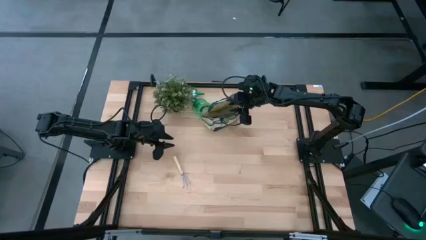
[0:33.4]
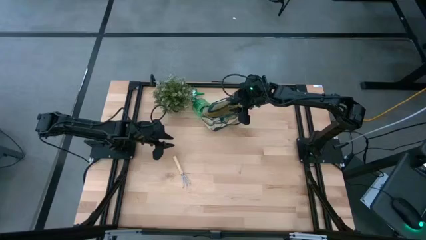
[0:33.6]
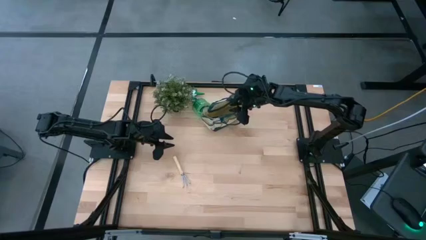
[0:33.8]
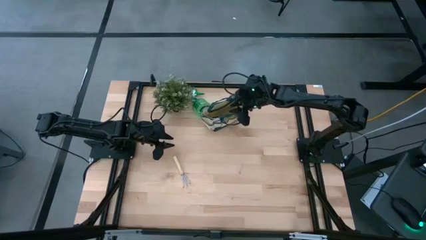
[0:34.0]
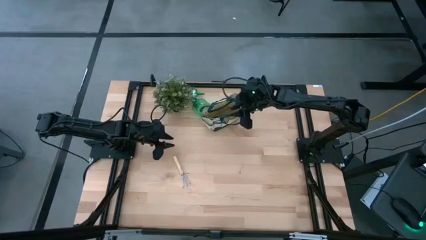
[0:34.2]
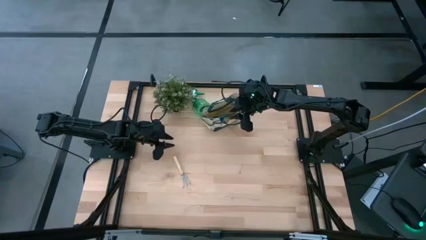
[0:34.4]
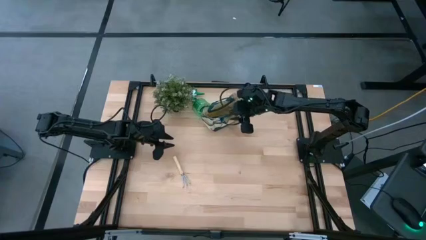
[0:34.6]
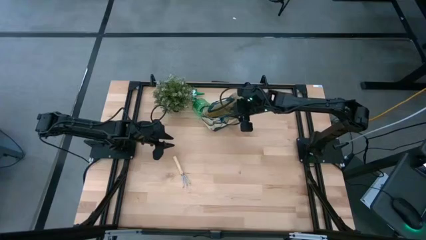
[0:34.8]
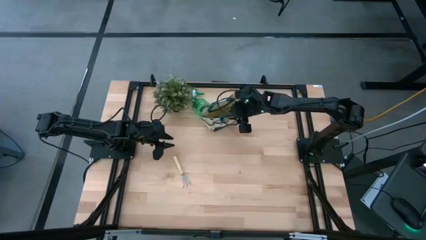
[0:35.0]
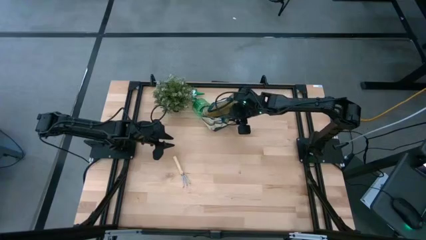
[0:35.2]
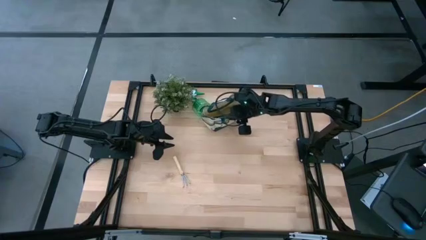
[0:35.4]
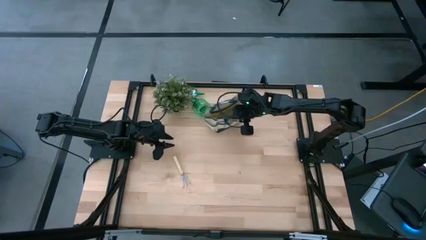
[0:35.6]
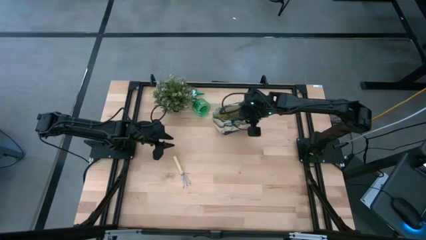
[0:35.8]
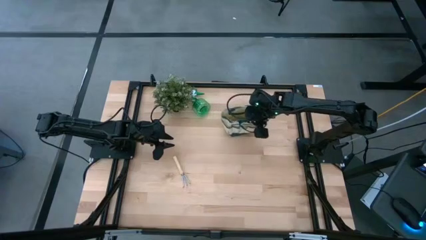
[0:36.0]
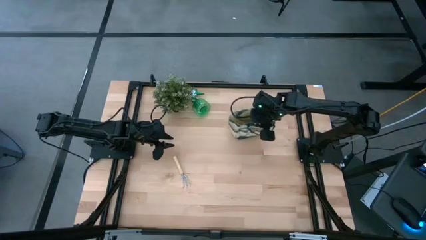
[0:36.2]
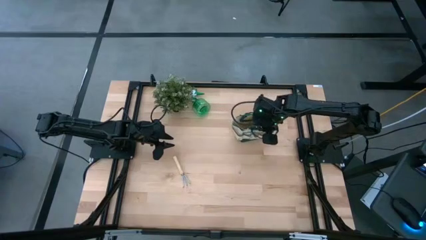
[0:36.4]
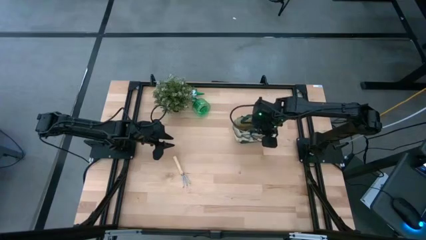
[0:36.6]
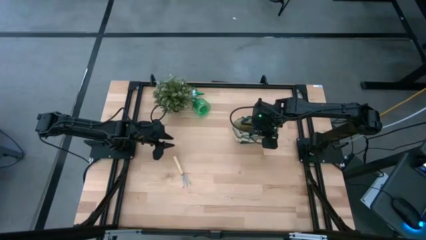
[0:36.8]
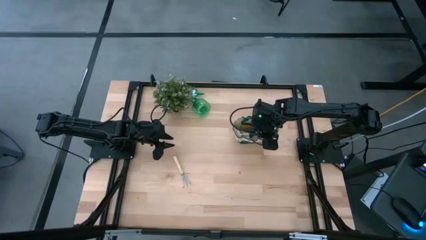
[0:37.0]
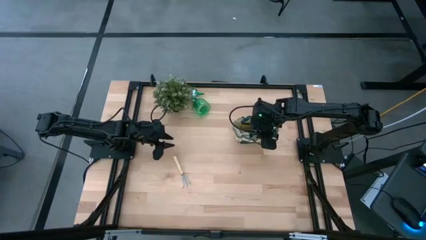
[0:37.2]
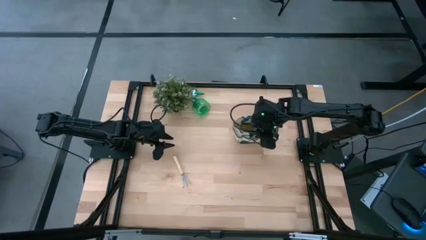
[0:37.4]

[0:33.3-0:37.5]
Task: Pick & Place Garden tools in Gardening bag
Move the gardening bag slightly to the right center on the table

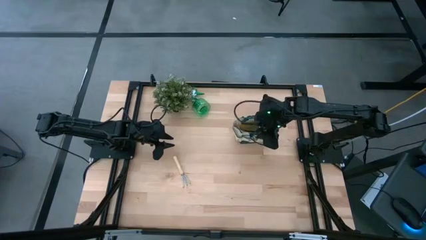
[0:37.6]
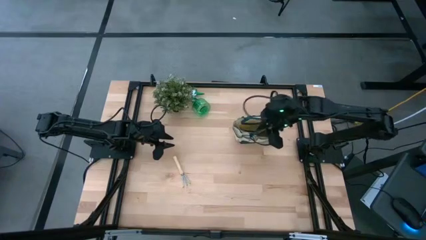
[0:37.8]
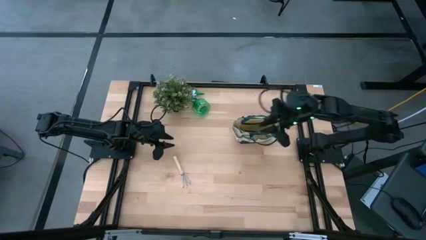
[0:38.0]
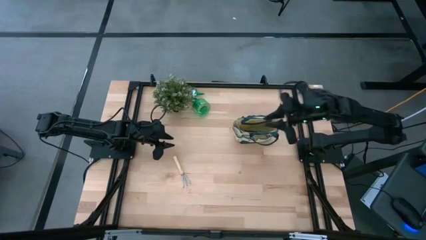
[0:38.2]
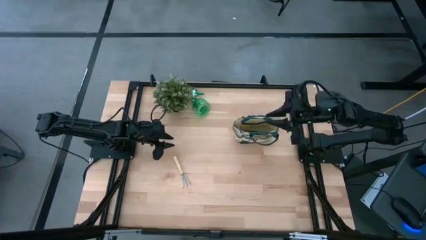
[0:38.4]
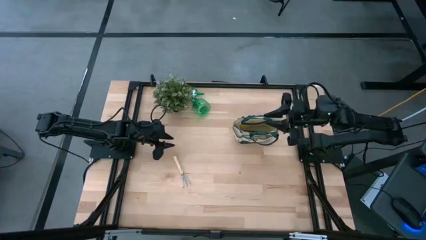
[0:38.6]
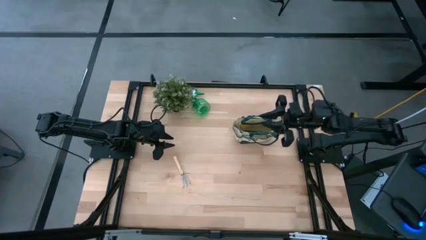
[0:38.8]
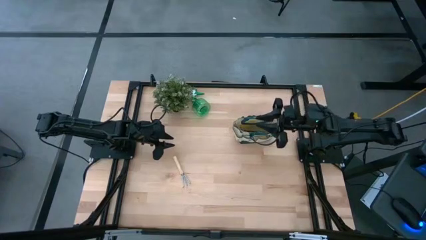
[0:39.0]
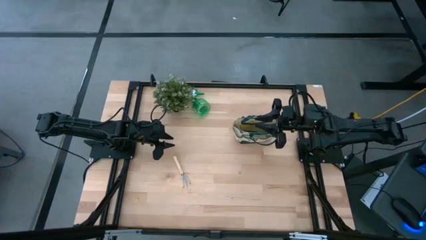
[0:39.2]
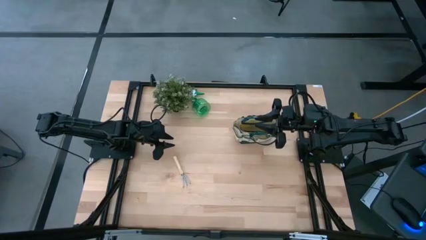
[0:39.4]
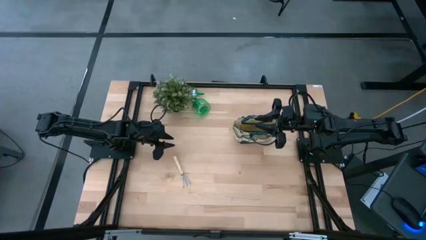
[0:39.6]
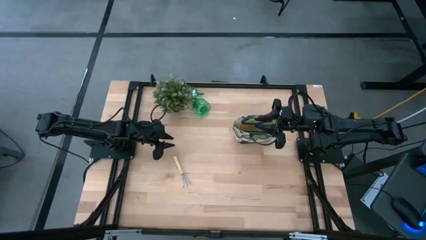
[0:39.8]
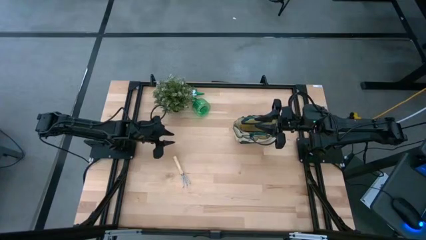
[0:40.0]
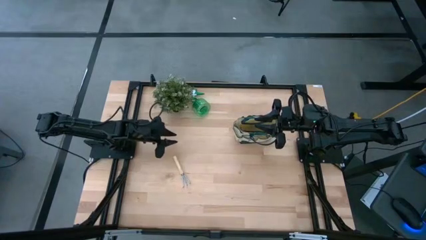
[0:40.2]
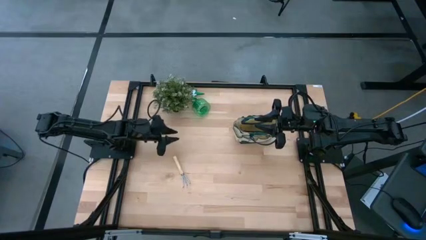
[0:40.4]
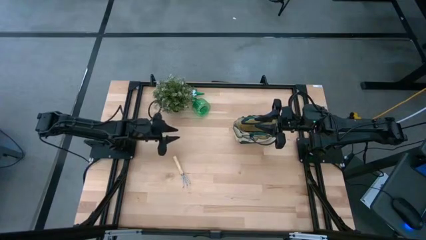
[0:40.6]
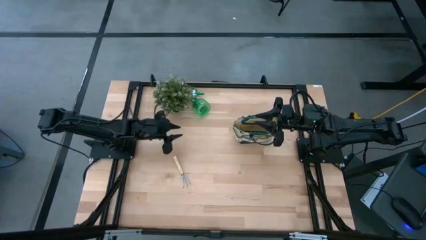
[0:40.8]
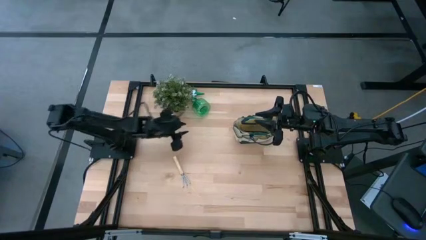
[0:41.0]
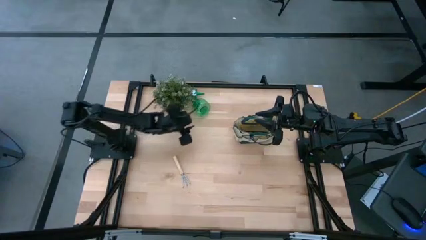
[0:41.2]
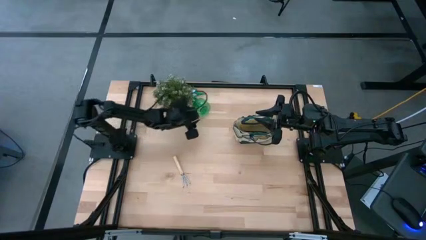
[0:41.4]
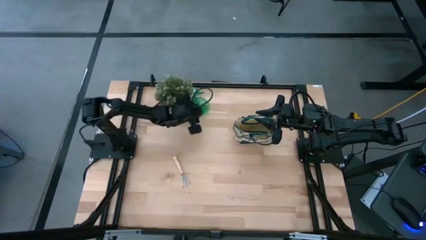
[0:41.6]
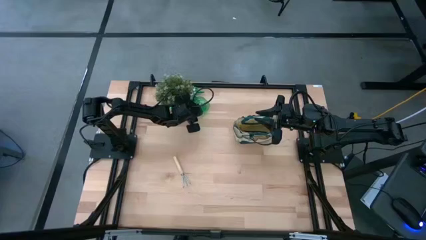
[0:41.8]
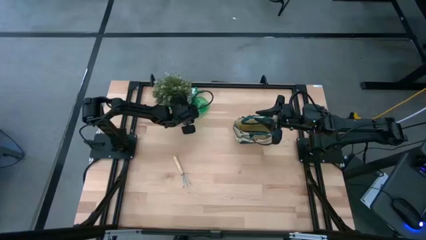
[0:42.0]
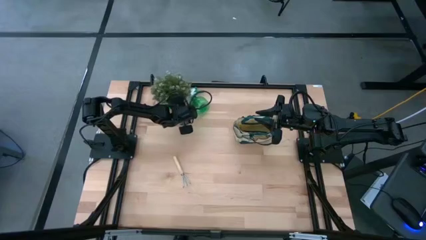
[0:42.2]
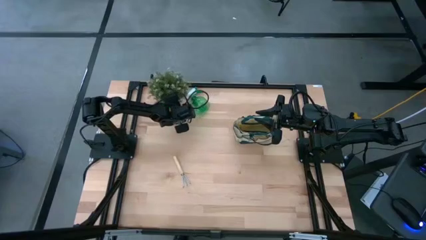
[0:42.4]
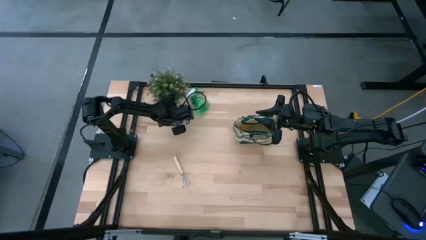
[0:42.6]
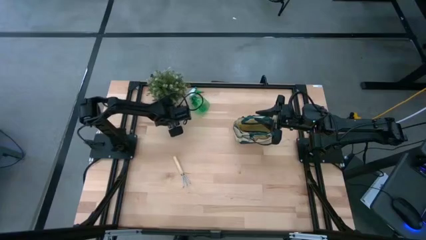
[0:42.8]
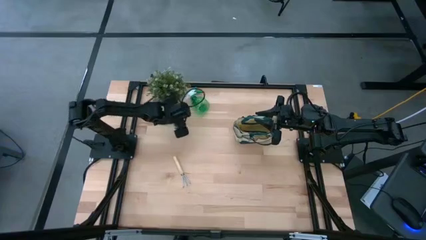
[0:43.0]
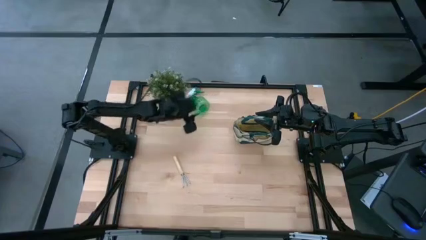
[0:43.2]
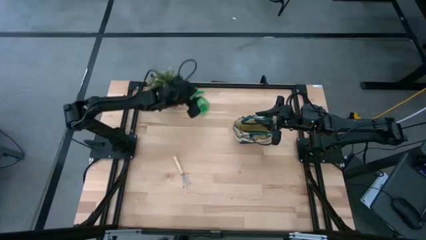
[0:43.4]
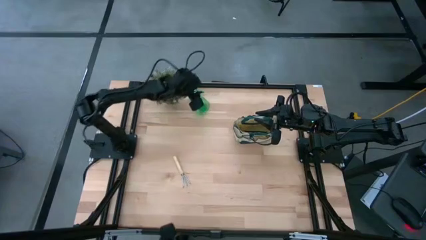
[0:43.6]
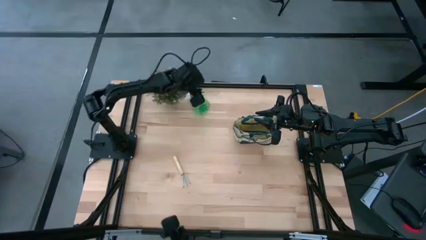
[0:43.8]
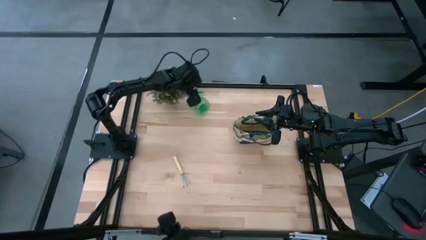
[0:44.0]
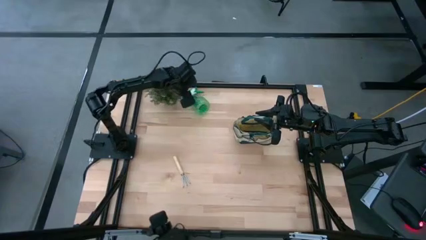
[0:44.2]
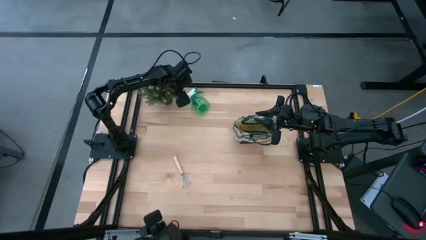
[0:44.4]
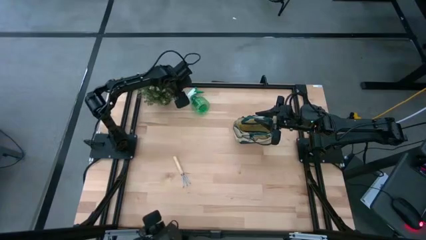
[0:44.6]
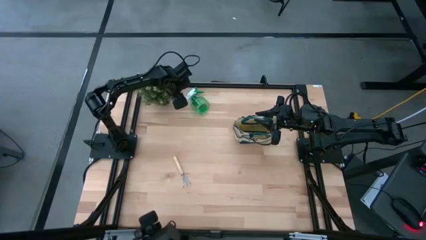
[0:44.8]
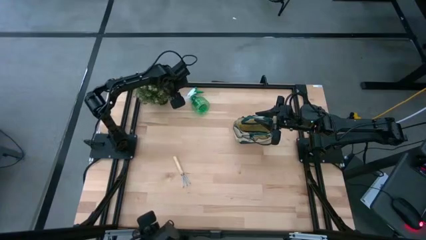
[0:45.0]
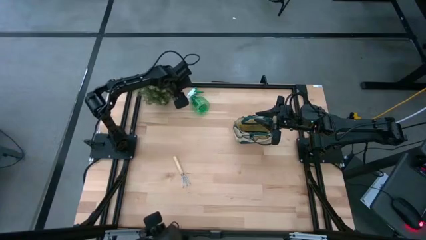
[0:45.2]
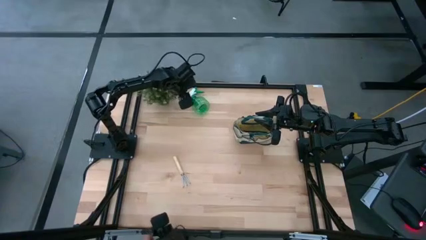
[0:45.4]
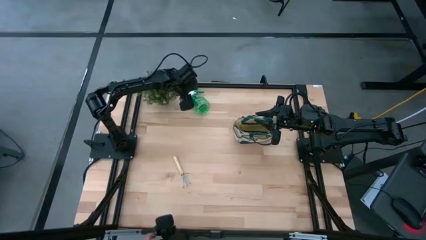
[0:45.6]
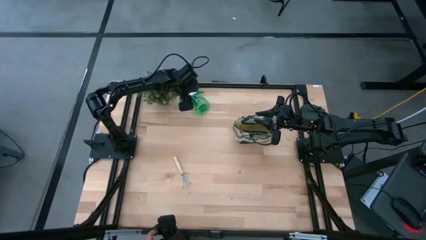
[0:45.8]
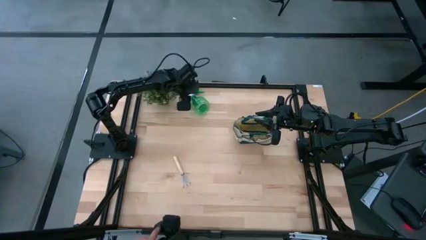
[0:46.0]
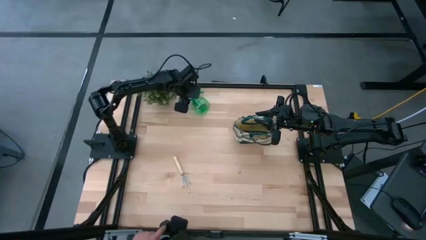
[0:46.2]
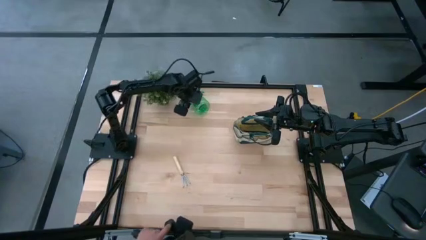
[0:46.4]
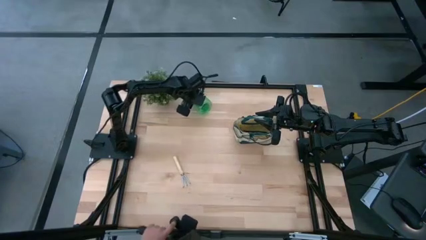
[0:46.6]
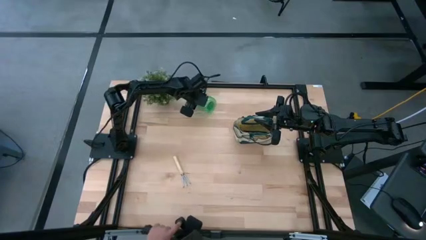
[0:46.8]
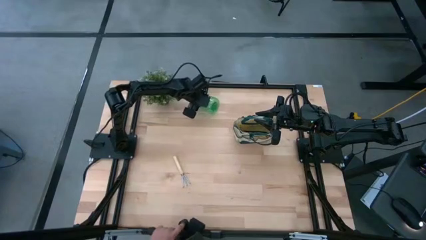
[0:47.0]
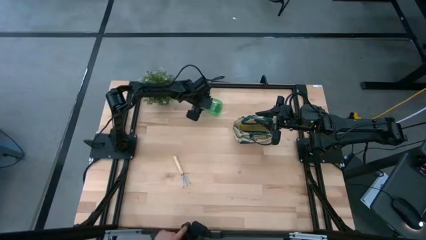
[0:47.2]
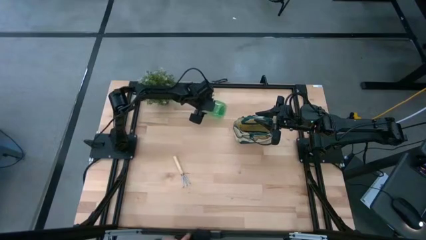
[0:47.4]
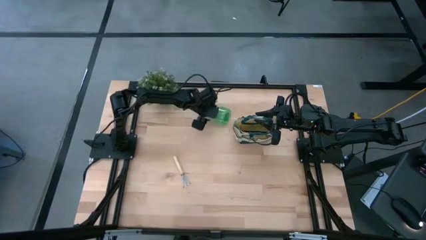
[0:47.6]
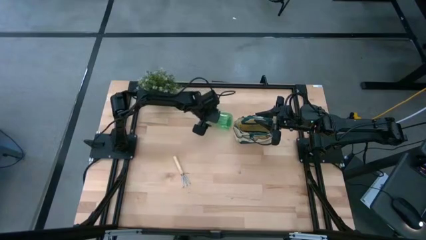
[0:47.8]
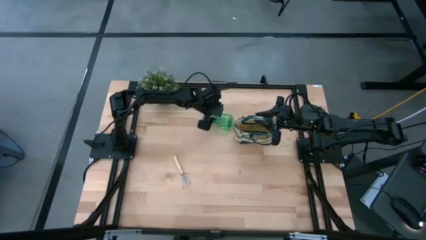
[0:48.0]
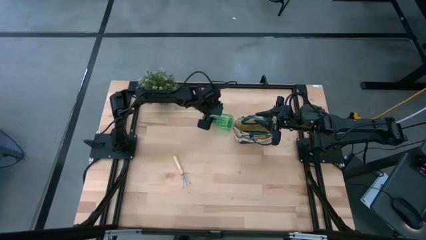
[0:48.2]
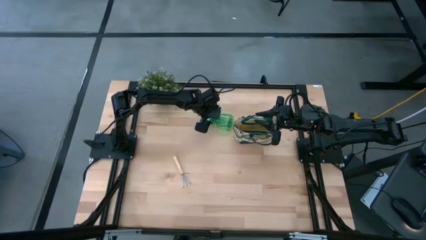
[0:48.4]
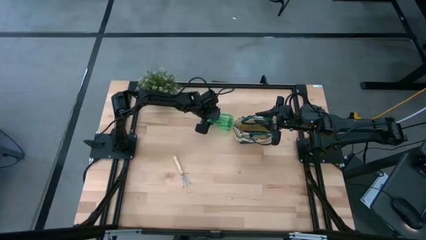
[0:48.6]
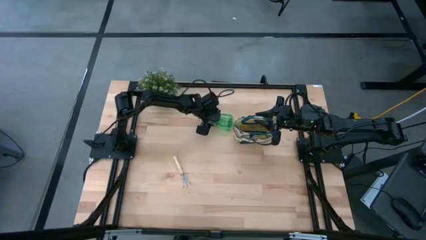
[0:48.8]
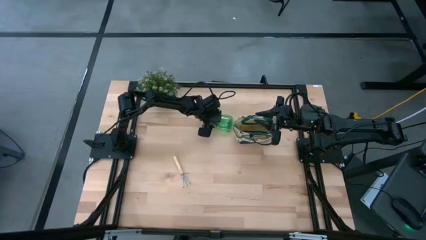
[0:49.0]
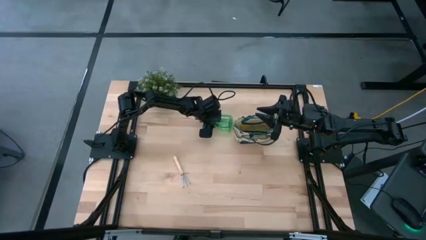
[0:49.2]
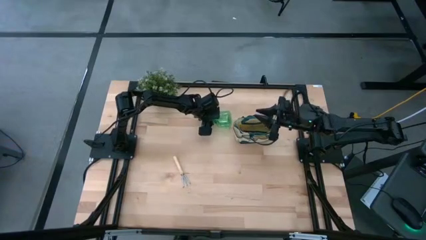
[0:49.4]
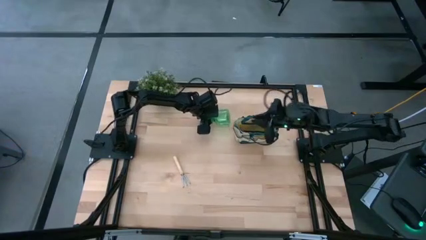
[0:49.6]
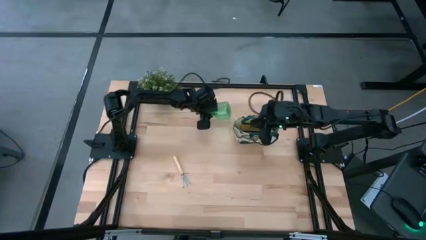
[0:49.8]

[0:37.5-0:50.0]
Put the spray bottle into the gardening bag
